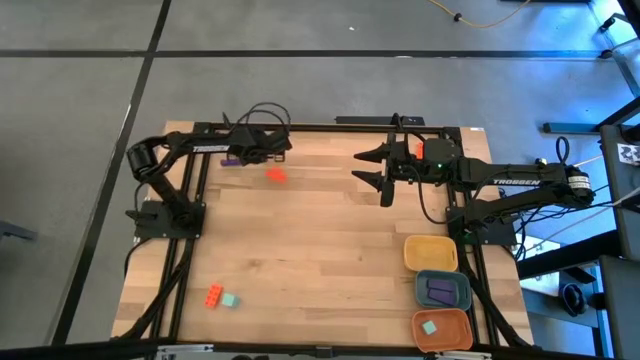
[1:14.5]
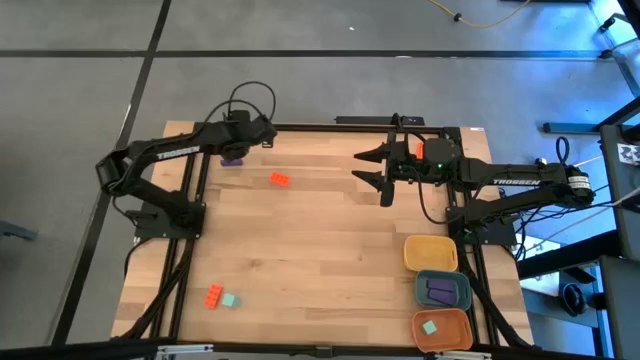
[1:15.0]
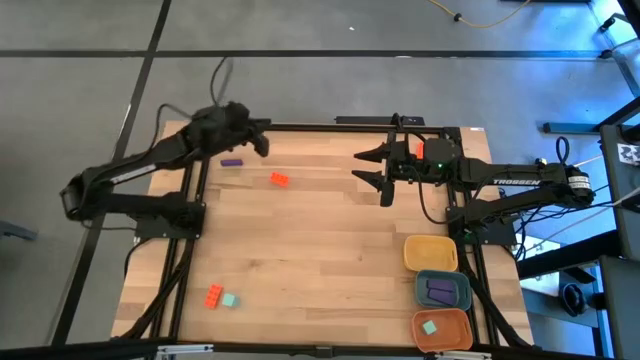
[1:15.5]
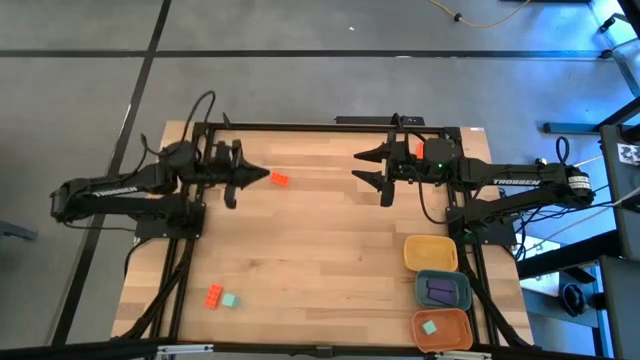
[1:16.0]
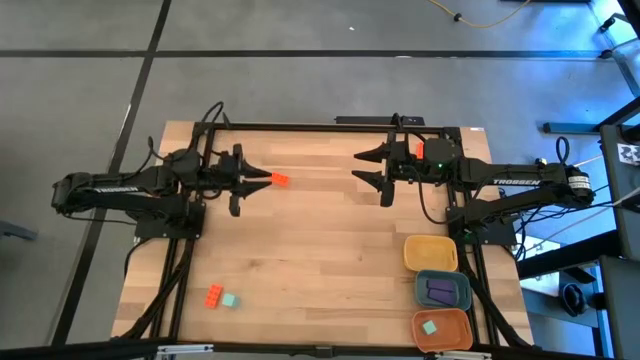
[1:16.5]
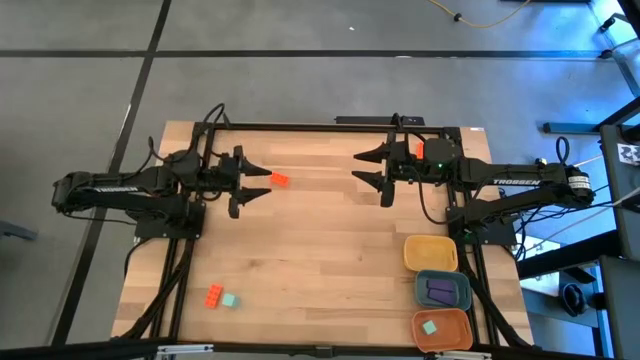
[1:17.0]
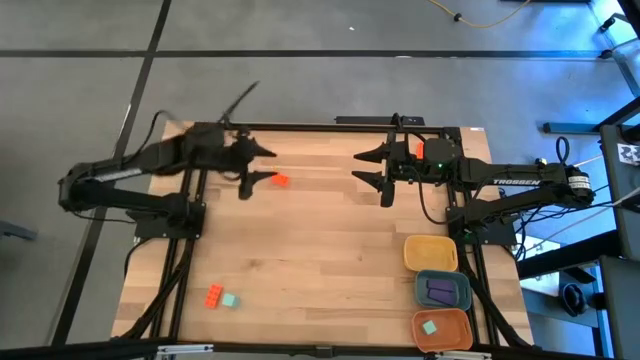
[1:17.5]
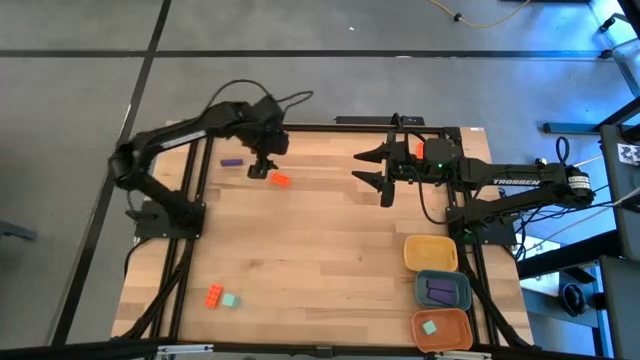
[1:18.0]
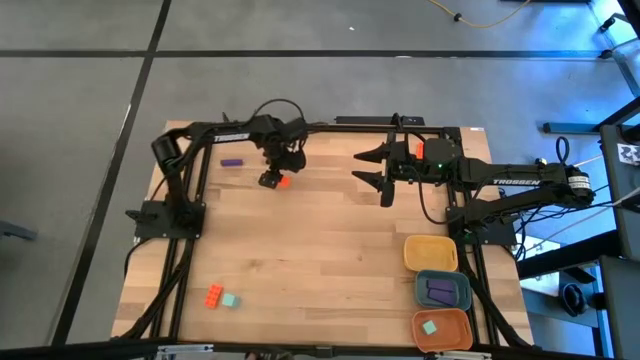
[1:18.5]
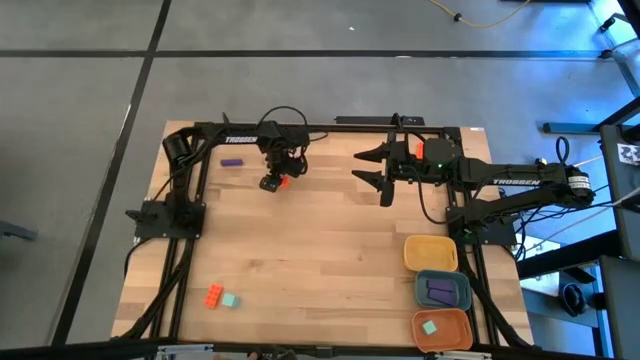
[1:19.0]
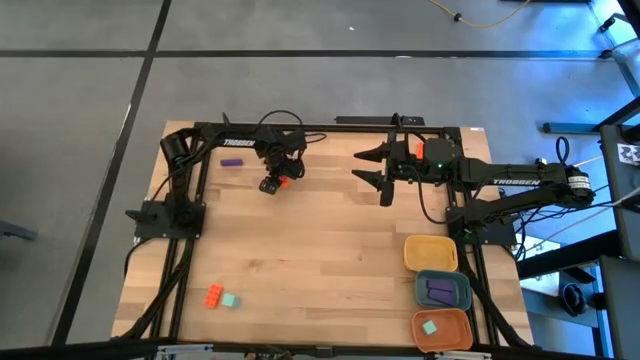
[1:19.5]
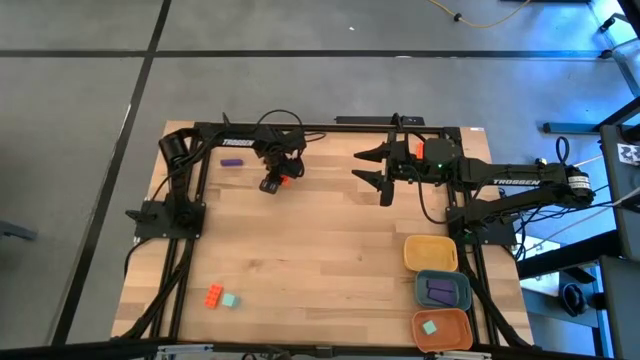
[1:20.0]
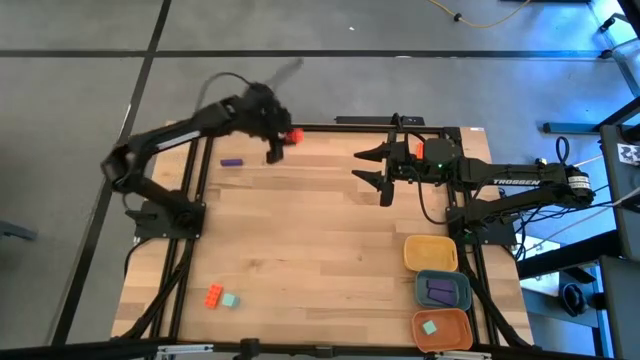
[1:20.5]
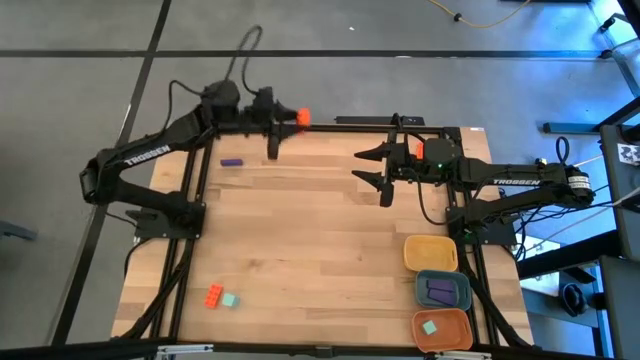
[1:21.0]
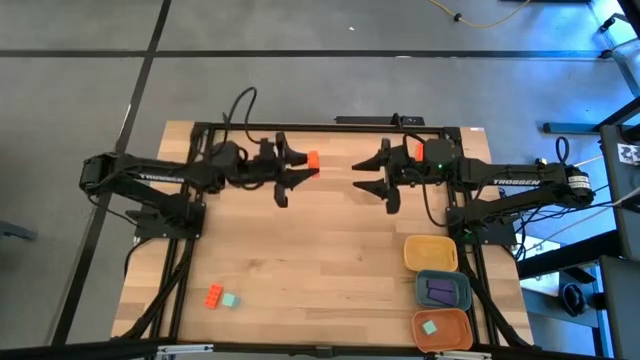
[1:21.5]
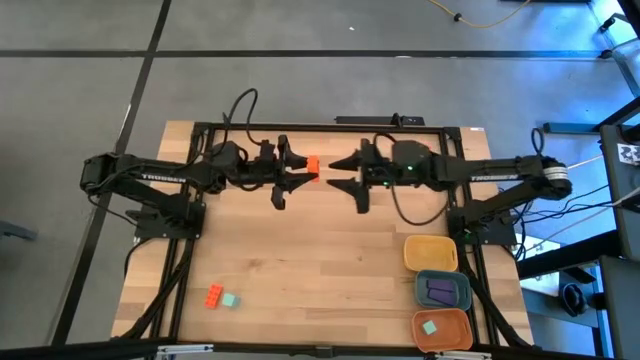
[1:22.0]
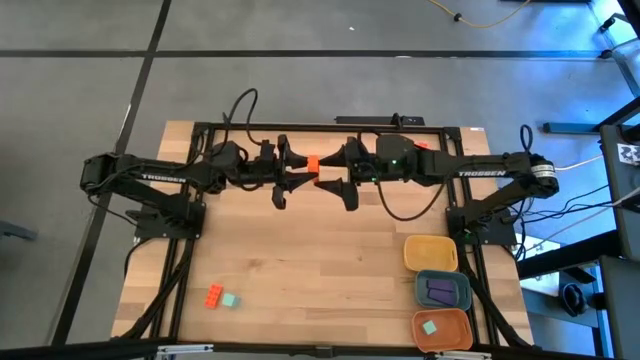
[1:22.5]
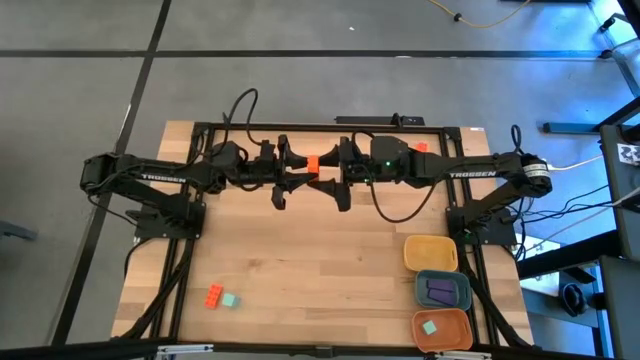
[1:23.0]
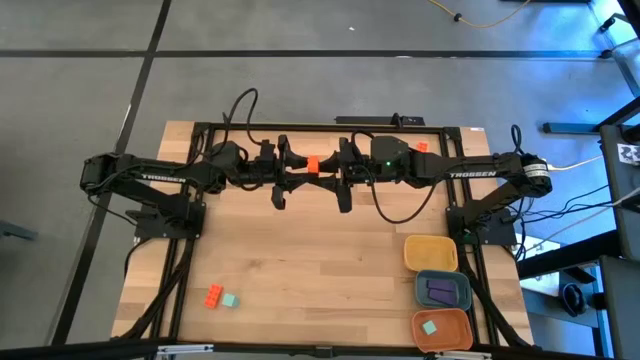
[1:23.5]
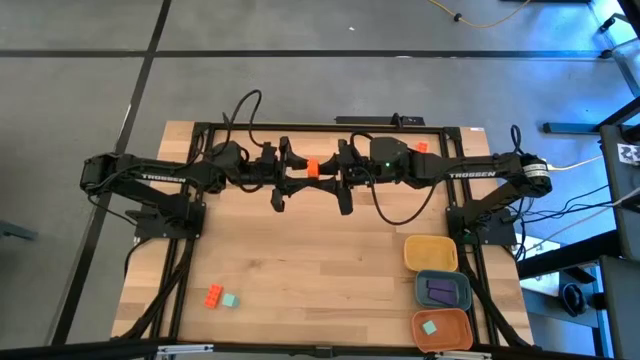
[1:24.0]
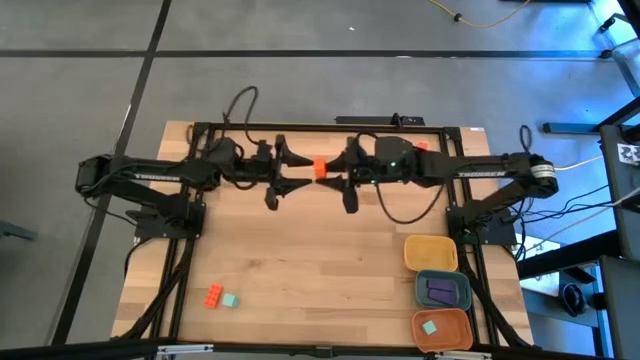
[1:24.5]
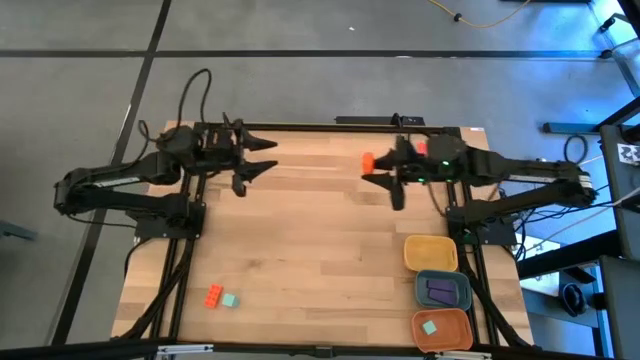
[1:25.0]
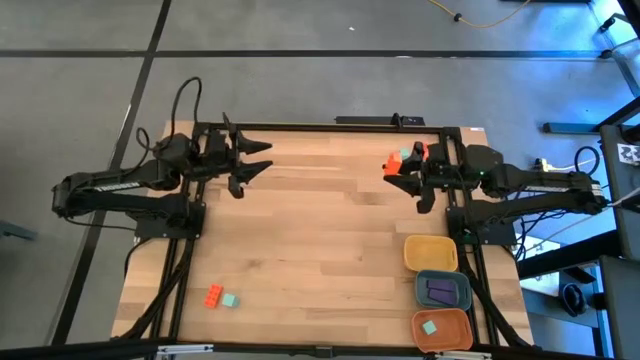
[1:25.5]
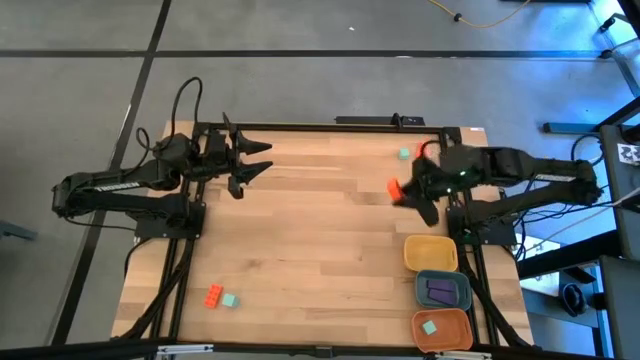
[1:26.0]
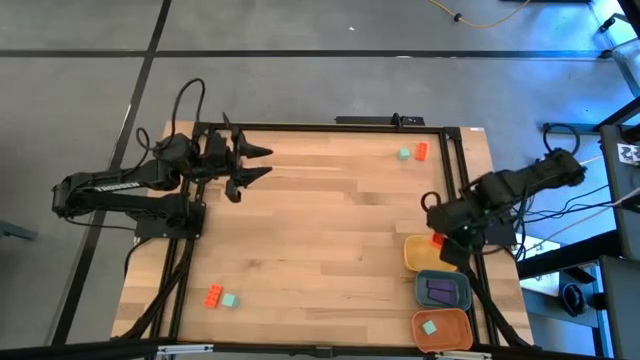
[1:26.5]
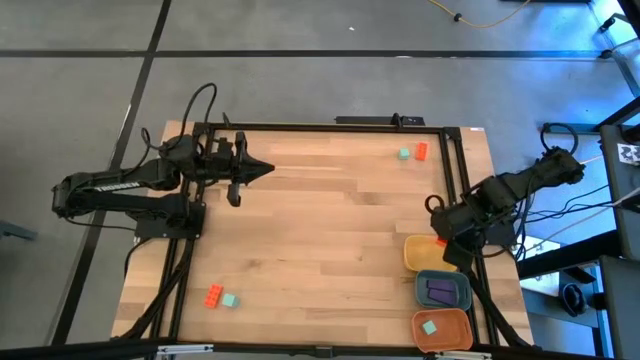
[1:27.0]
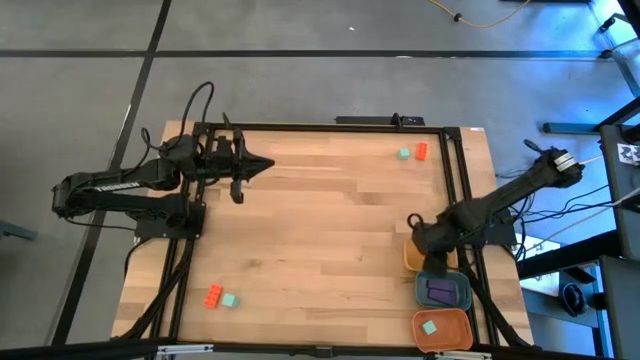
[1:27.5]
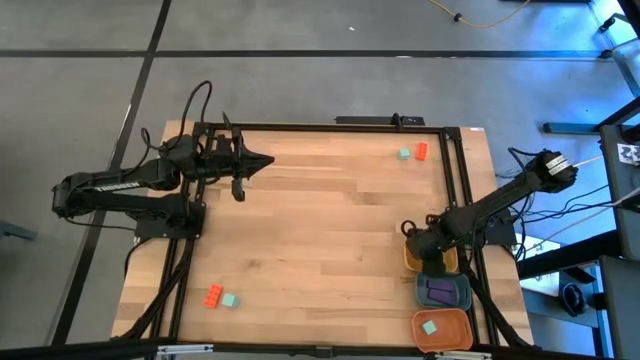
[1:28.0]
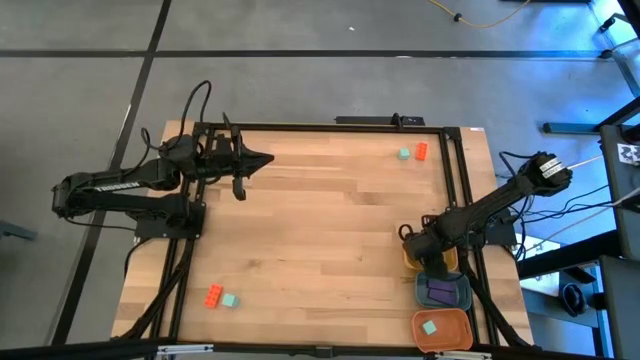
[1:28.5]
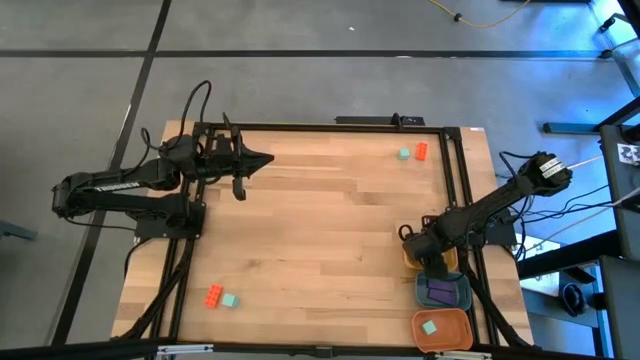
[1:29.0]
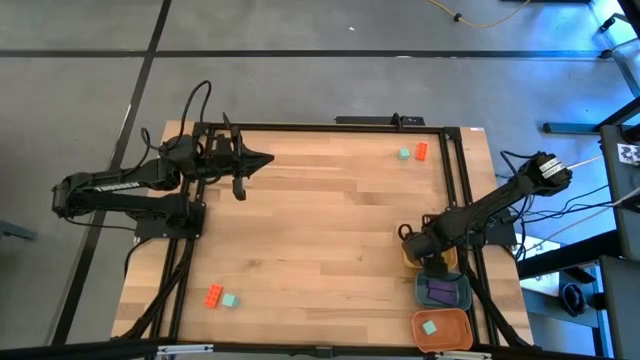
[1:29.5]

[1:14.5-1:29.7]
Task: Sort & place blocks by color
Put the top left orange game piece into the yellow bin

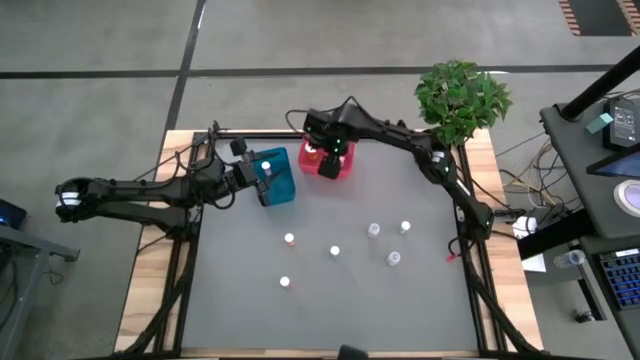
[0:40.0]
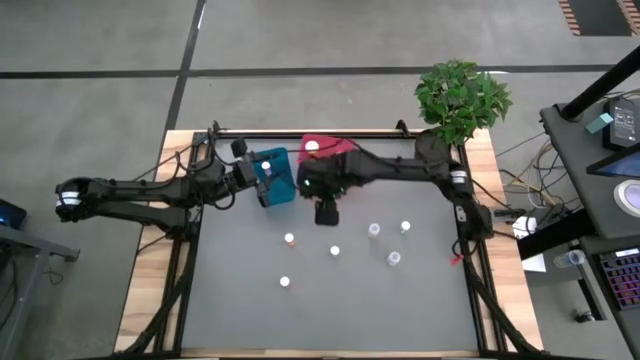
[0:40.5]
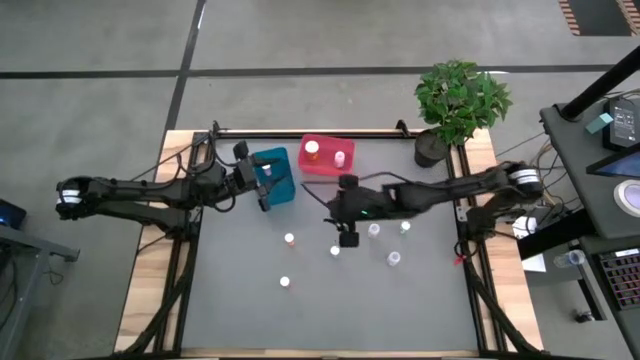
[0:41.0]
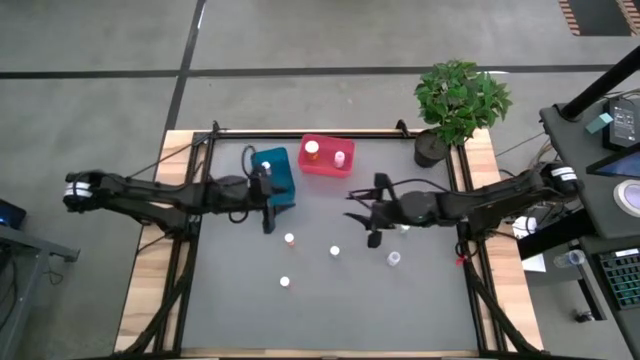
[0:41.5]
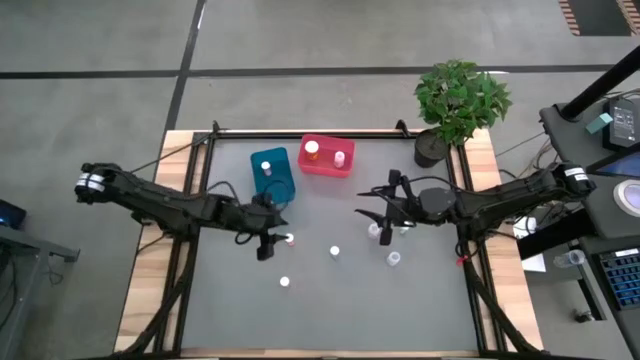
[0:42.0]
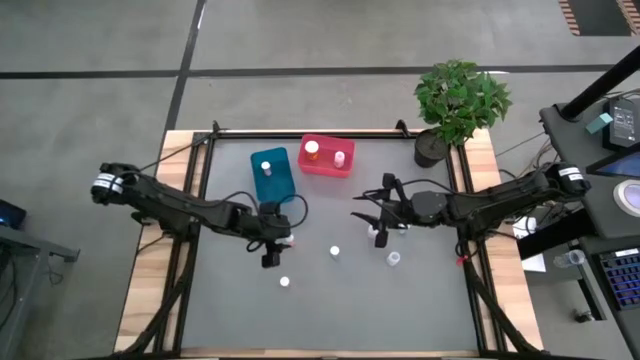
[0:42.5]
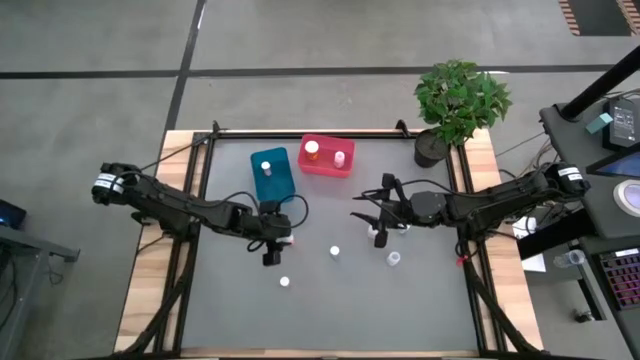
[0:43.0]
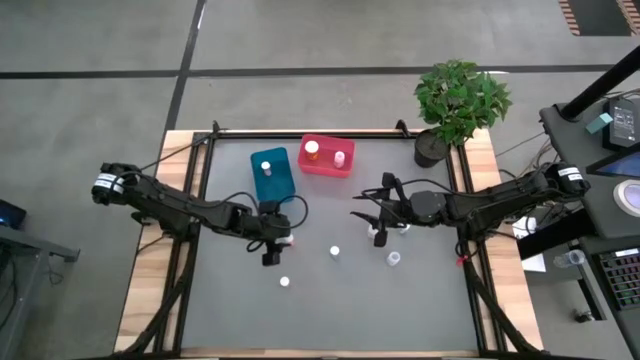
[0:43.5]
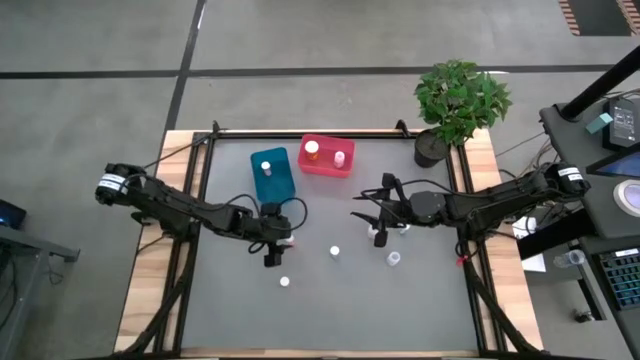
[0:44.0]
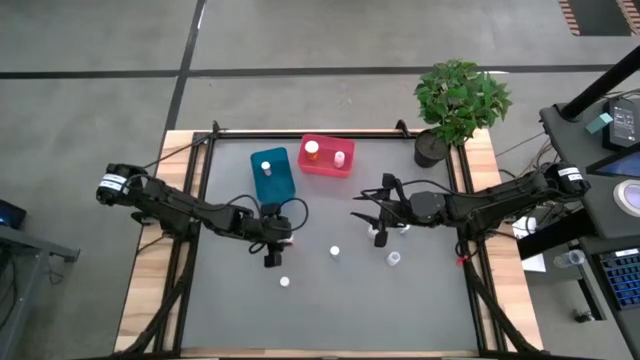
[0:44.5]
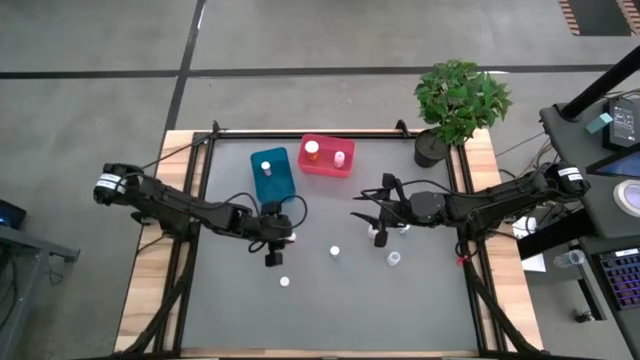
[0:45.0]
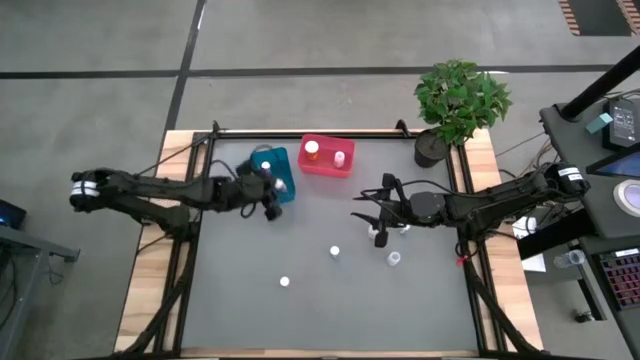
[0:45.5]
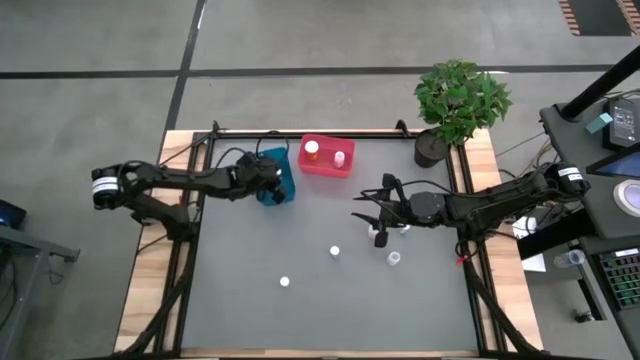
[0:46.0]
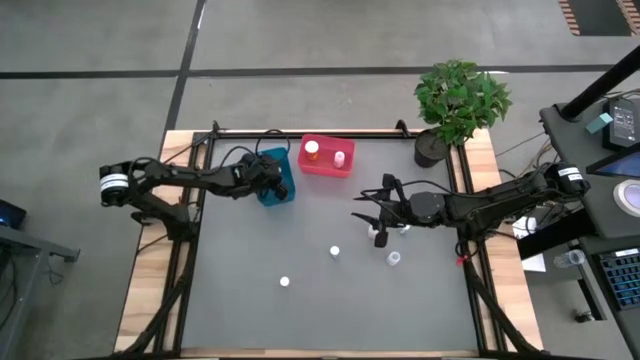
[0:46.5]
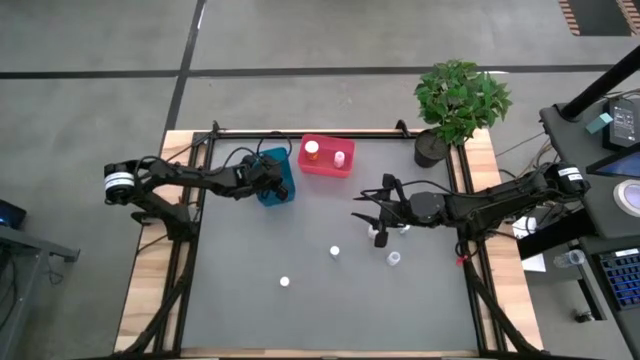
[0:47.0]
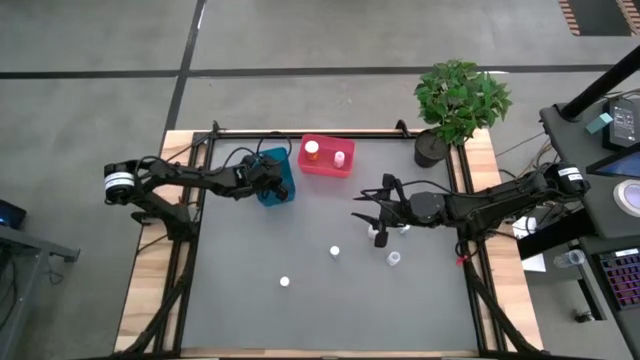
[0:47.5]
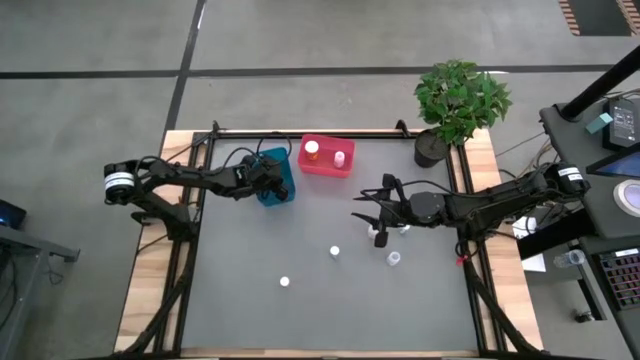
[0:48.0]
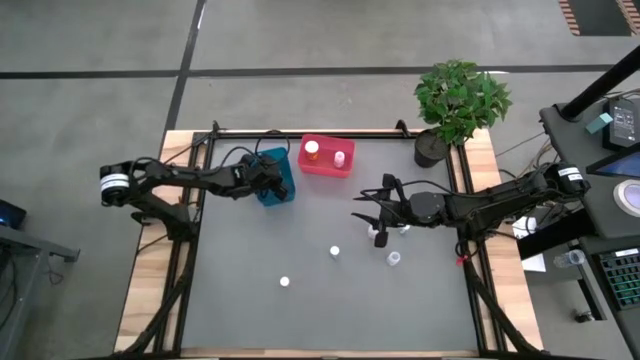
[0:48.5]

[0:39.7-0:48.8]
Task: Pick and place medicine bottles into bin by pill shape (circle, oval)
Put the orange tablet bottle into the blue bin
